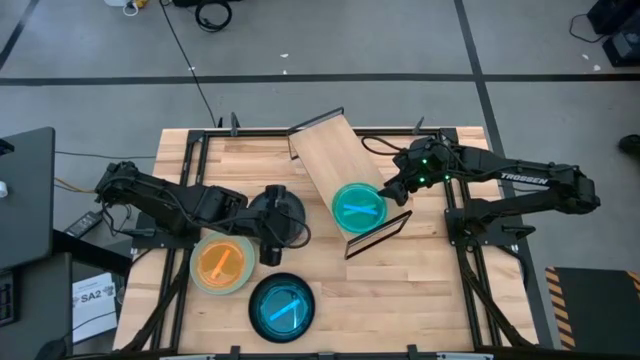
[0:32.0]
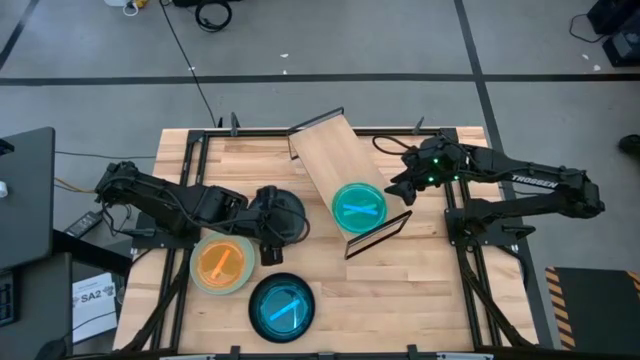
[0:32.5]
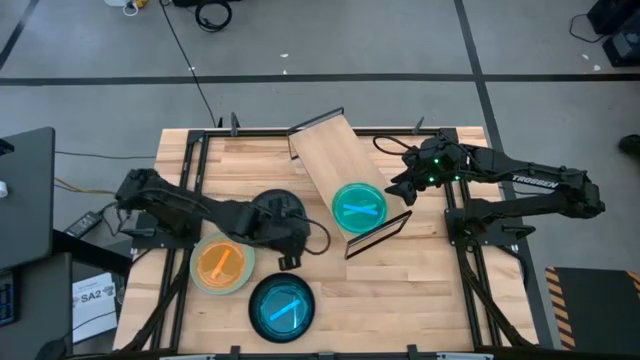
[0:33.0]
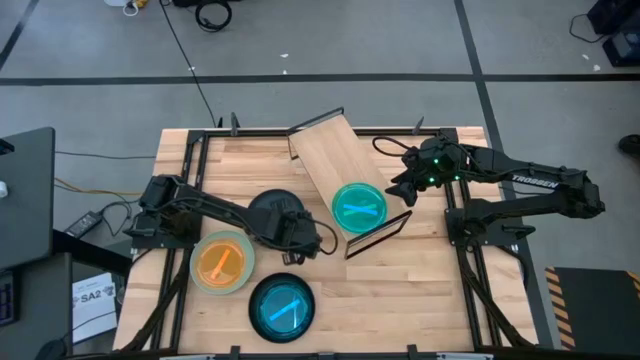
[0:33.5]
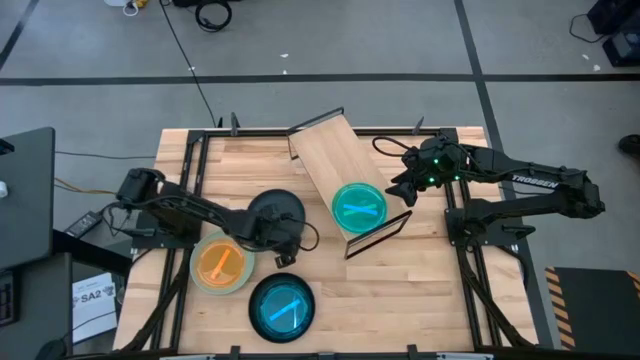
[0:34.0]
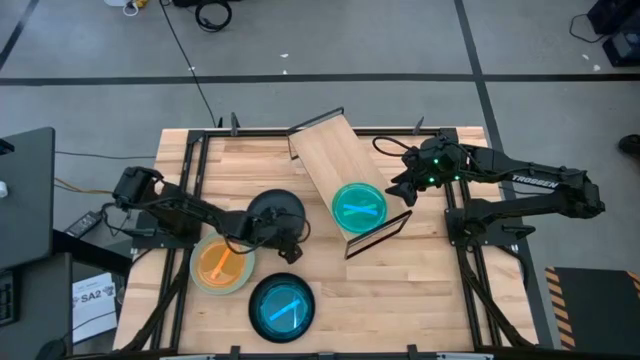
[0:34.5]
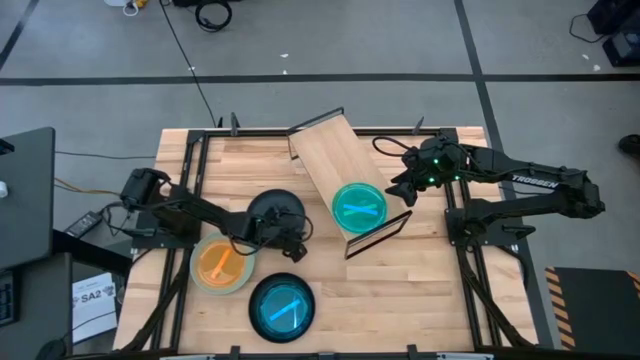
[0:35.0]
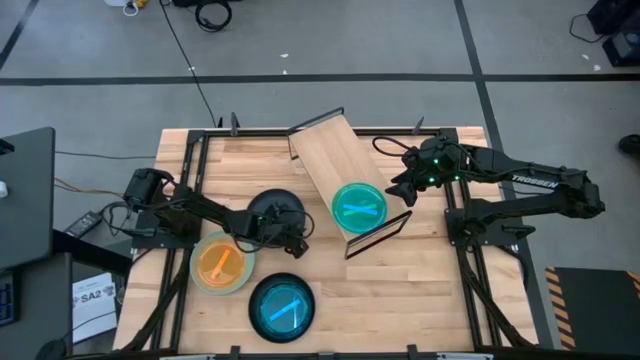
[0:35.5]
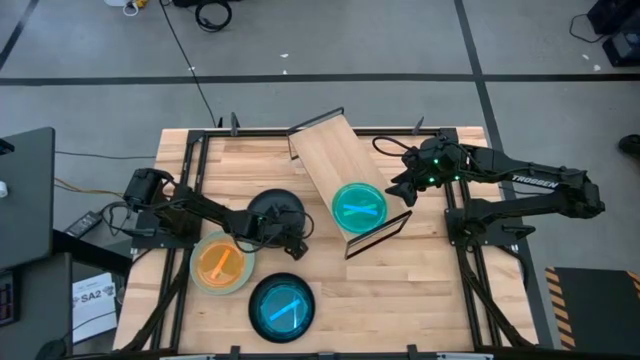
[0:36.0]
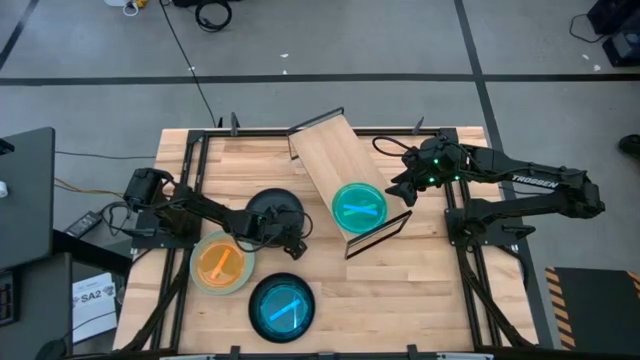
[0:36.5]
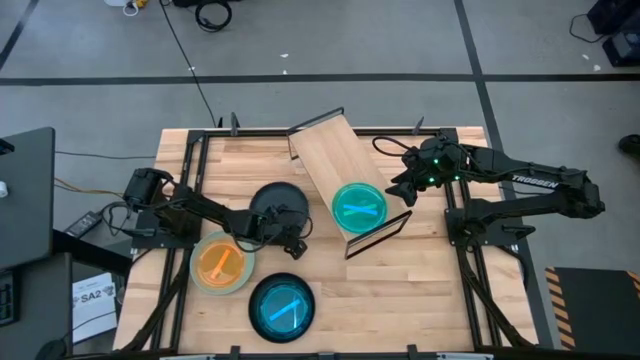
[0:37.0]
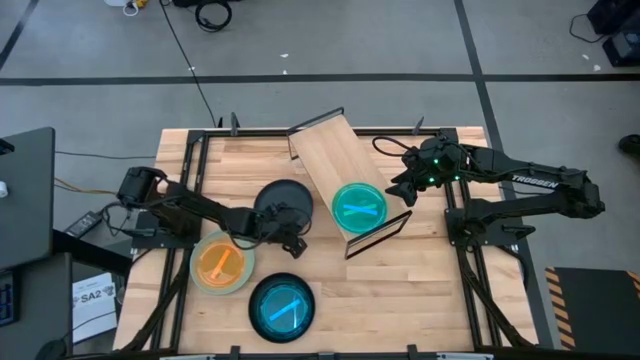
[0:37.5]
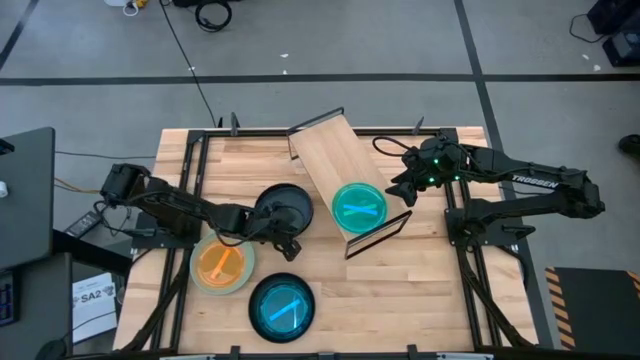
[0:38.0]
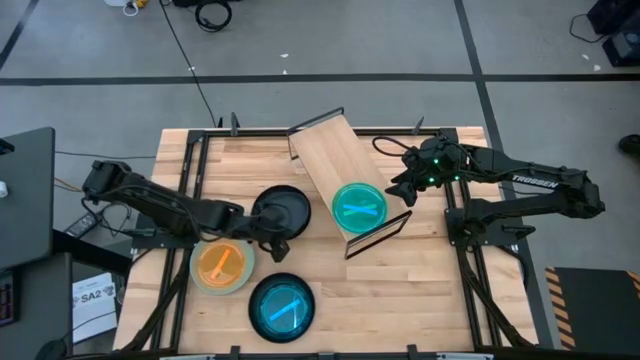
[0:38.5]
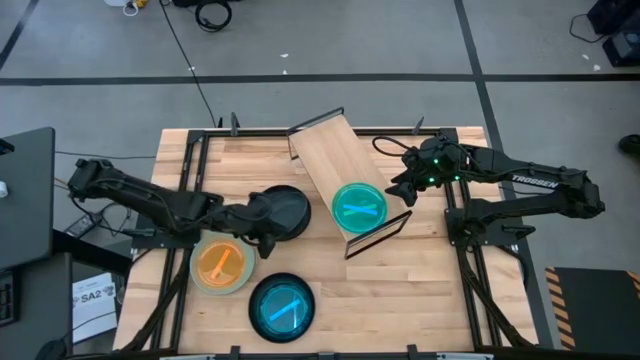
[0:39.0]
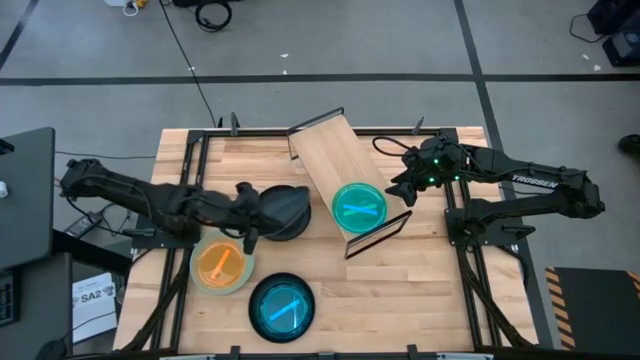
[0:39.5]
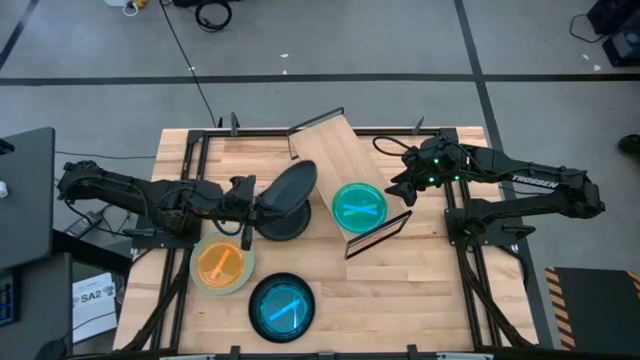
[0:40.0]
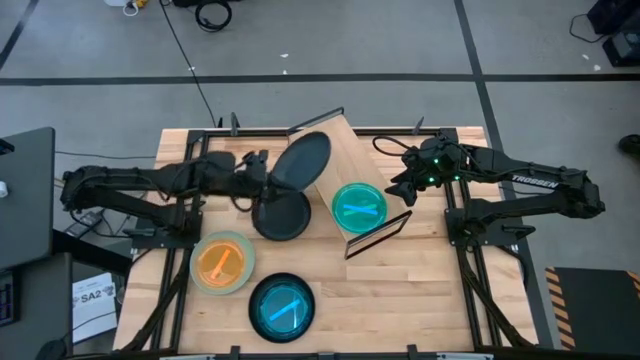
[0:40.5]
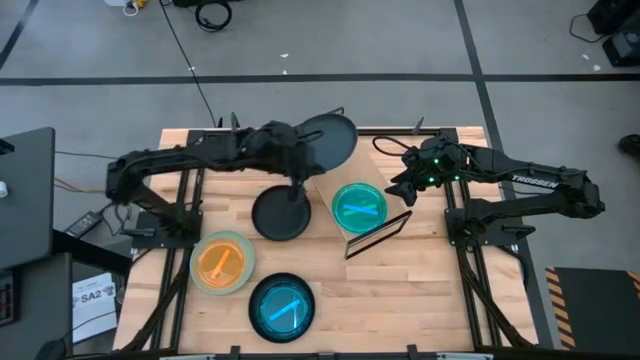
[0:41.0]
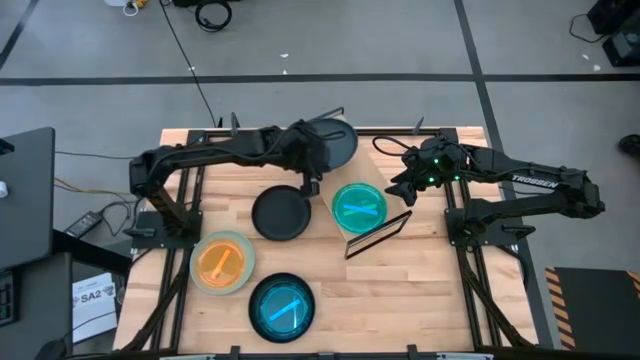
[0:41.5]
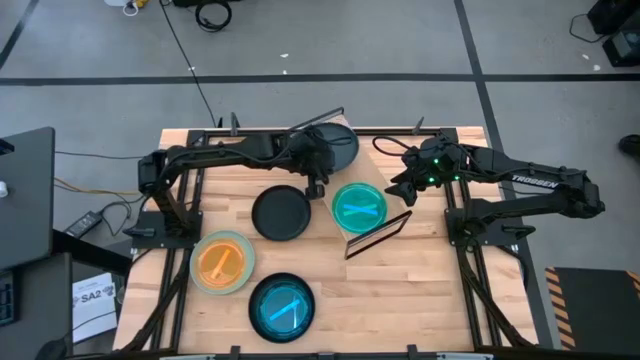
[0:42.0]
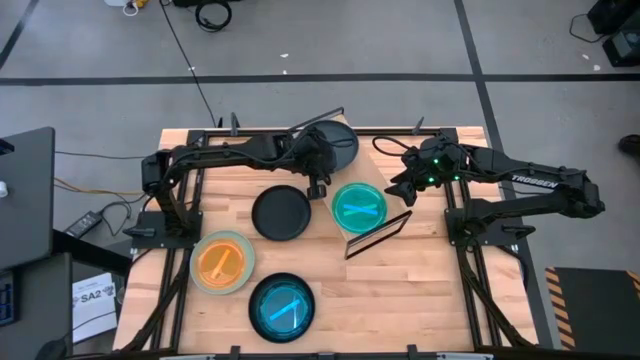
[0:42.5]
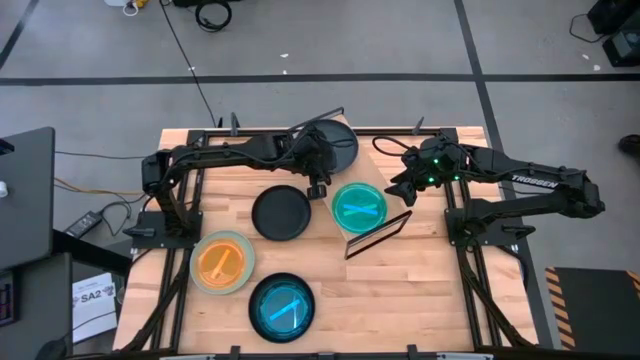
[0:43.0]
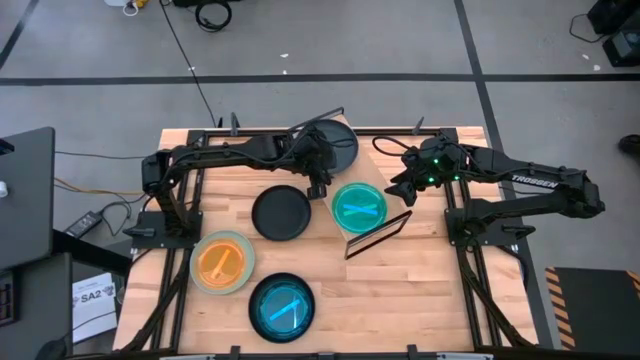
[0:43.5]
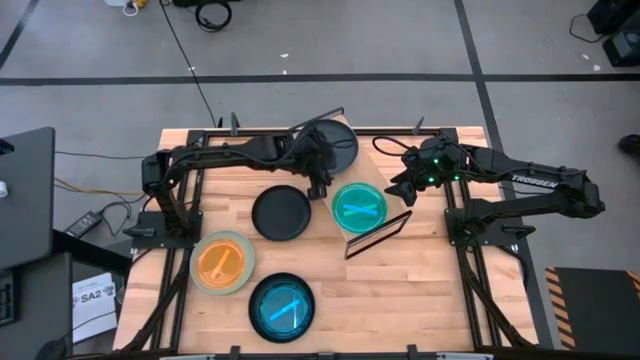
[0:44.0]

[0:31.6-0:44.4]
Task: Place and stack plates onto a shelf
Put the top black plate on the shelf

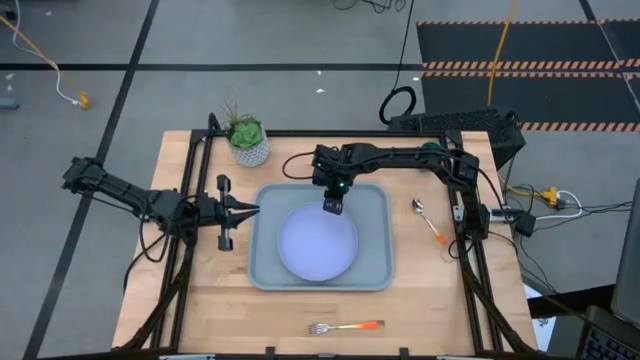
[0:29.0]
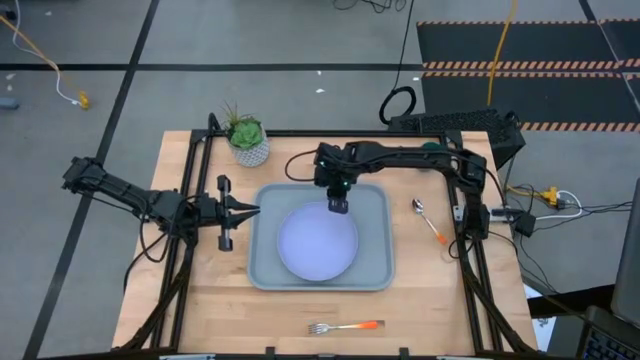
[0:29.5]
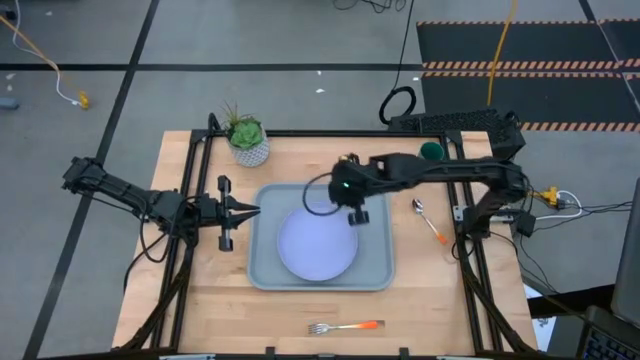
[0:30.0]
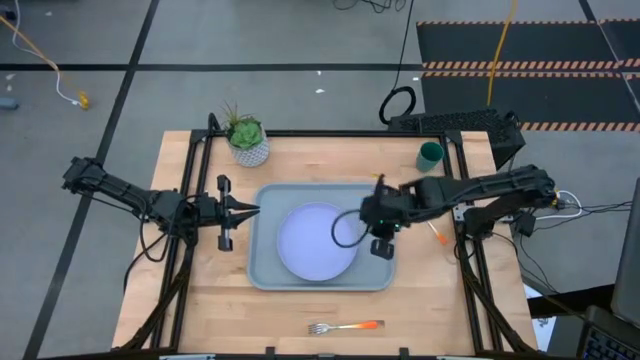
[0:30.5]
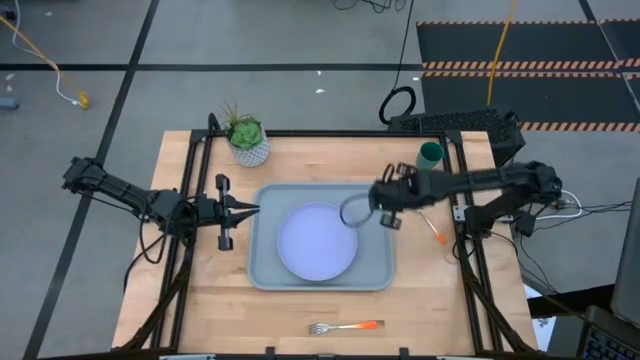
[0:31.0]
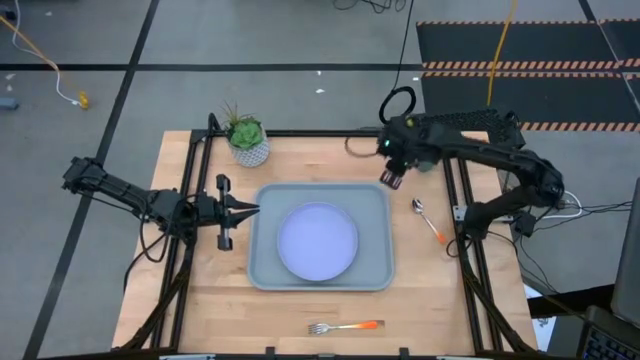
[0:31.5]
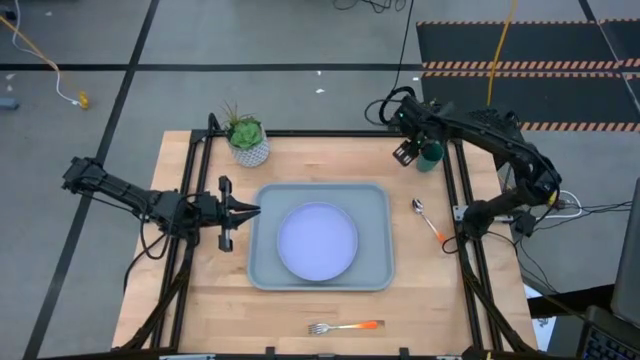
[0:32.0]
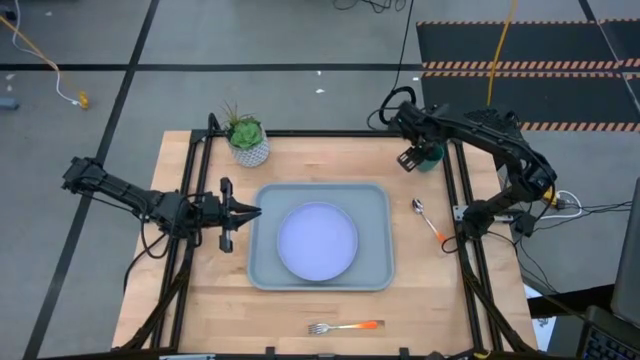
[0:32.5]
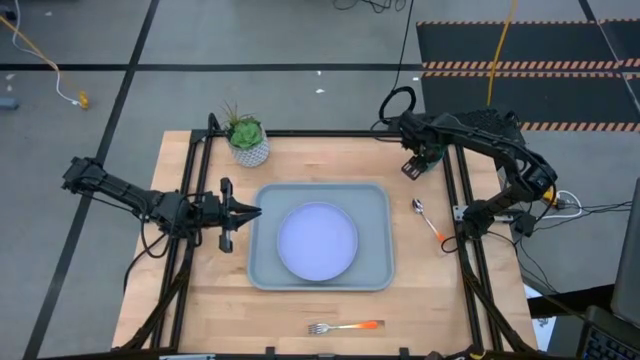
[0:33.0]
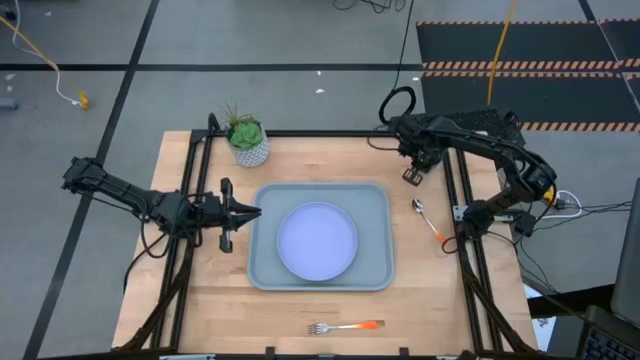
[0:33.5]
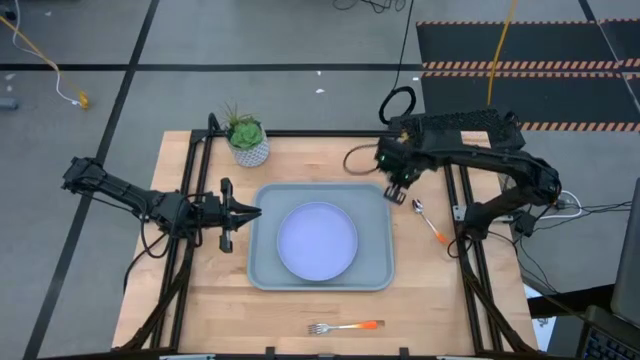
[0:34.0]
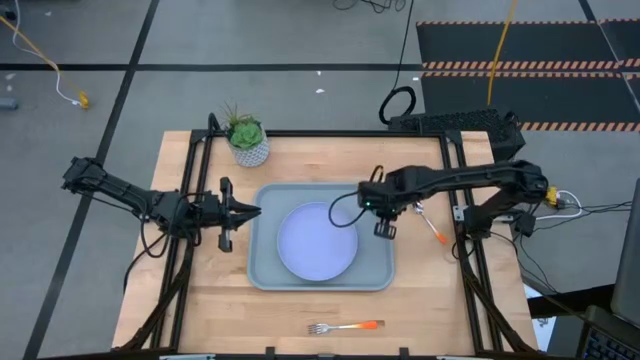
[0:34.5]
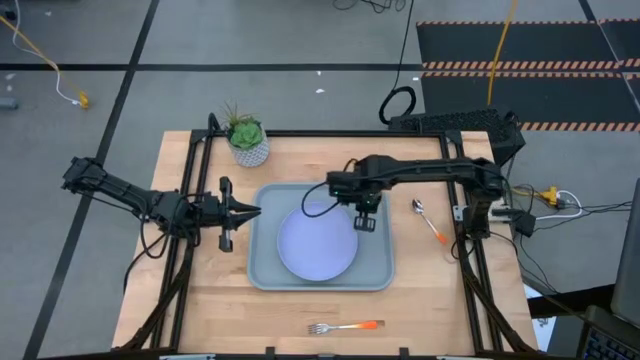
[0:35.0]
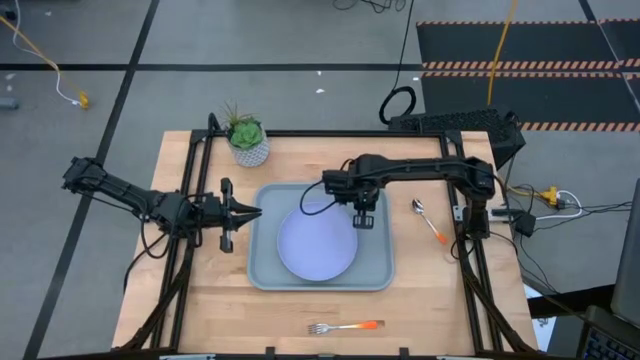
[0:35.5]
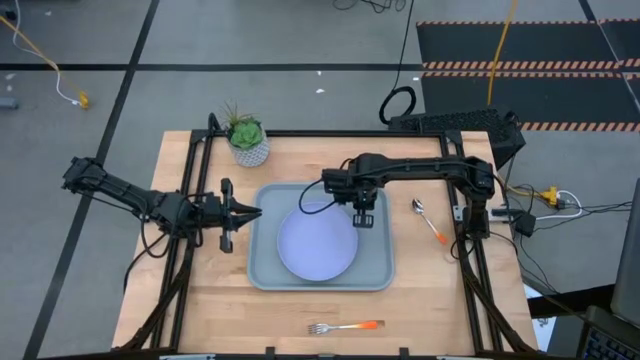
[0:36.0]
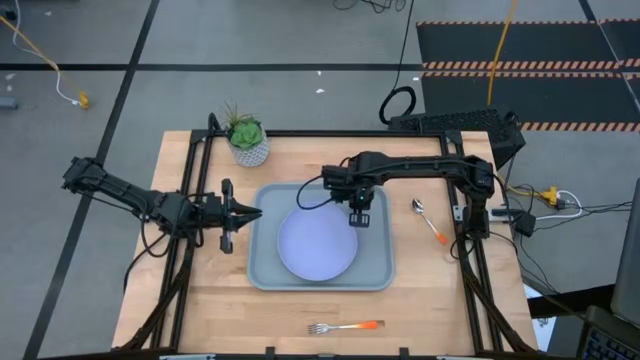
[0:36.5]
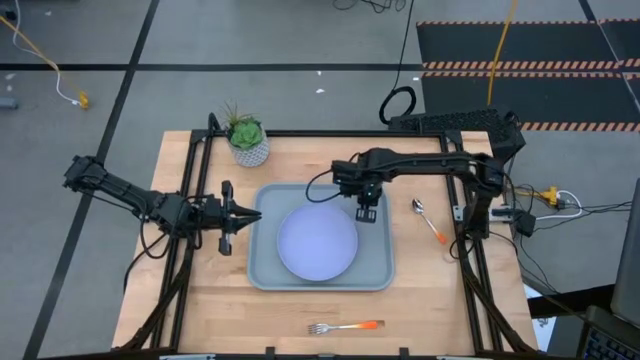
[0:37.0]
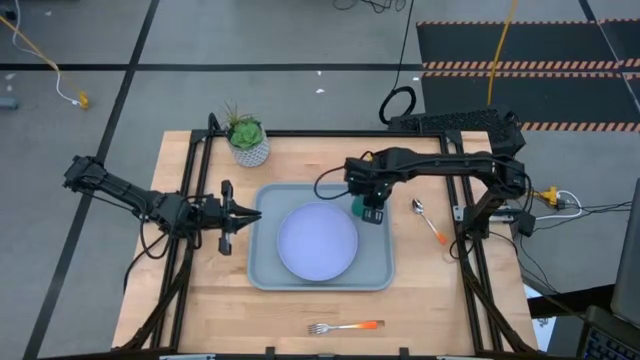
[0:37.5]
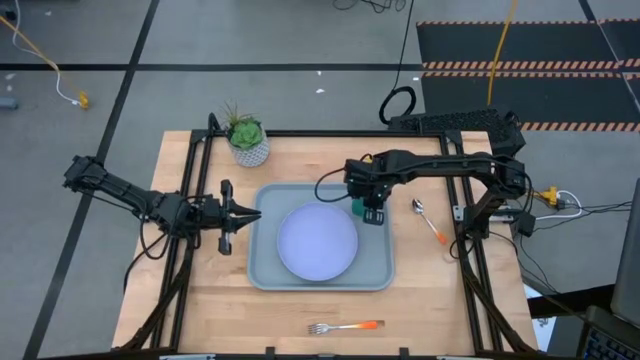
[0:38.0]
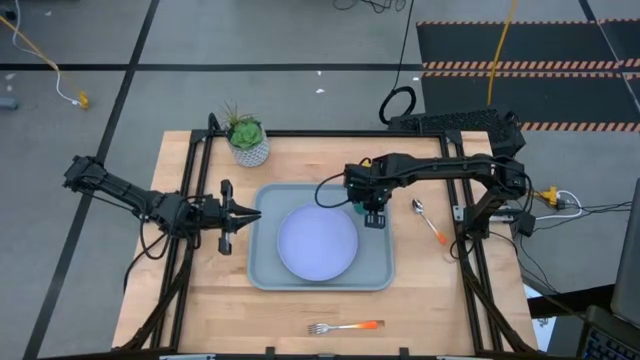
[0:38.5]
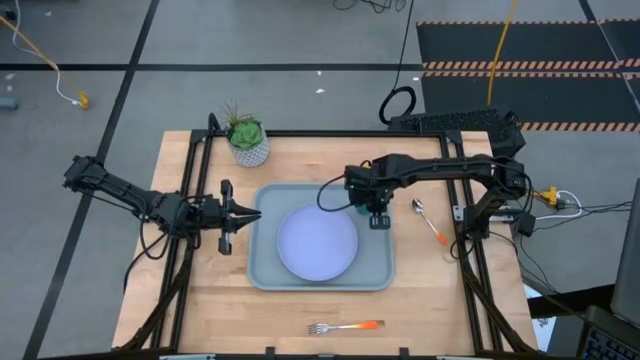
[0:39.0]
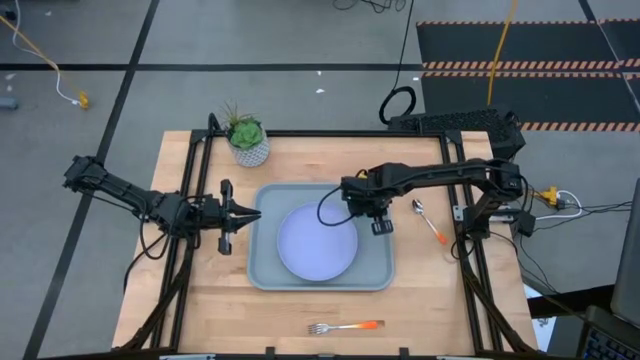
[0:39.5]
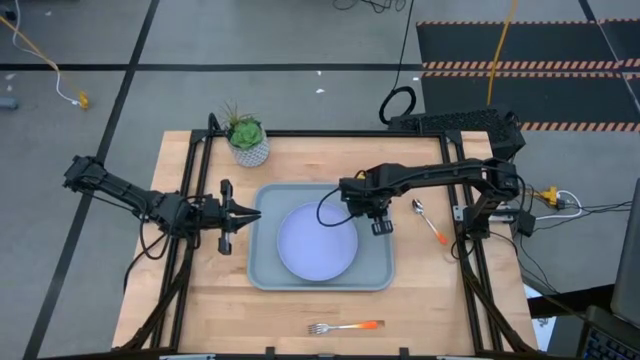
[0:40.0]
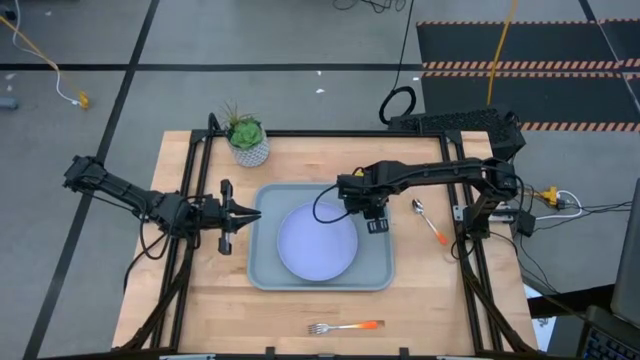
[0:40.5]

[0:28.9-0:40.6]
Task: Pick and place plate/cup/fork/spoon on tray
Put the green cup to the top right of the blue plate on the blue tray
